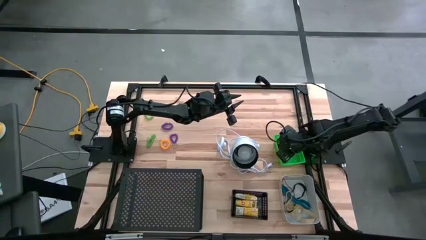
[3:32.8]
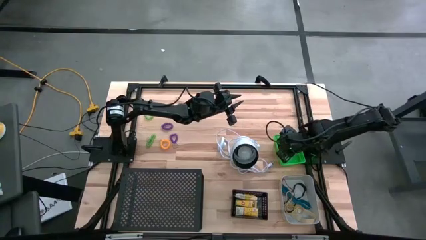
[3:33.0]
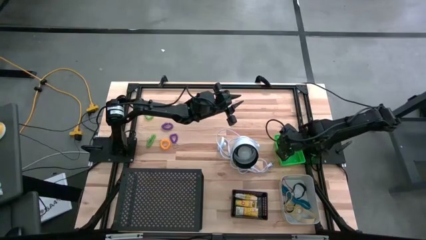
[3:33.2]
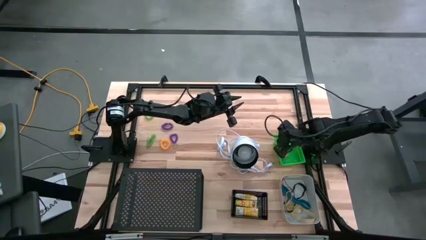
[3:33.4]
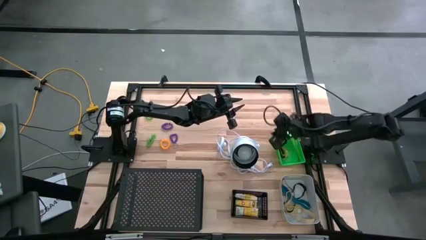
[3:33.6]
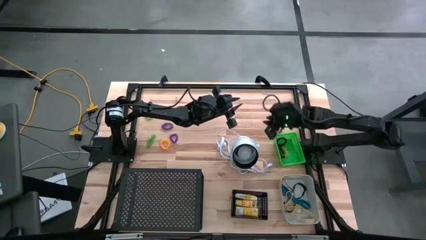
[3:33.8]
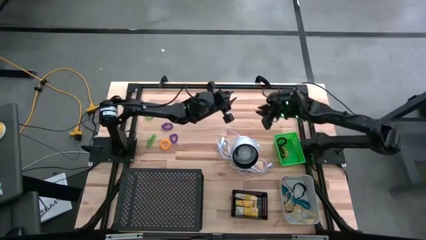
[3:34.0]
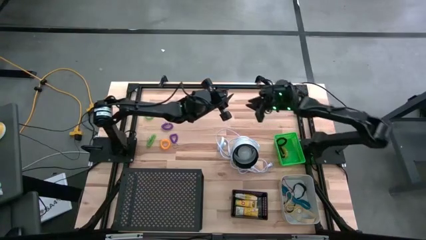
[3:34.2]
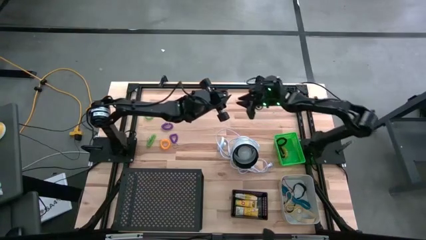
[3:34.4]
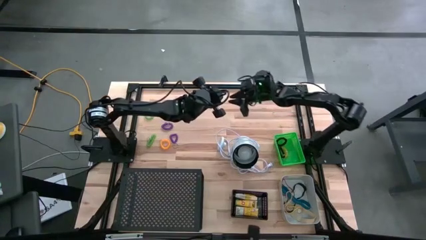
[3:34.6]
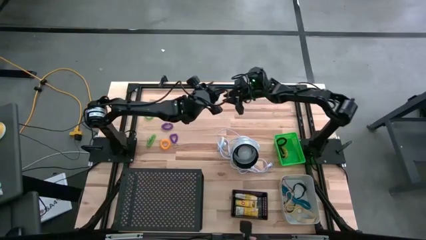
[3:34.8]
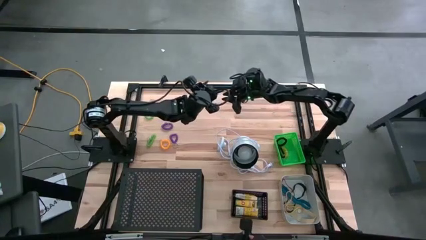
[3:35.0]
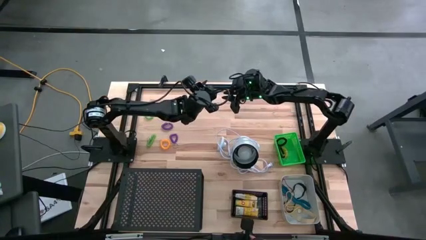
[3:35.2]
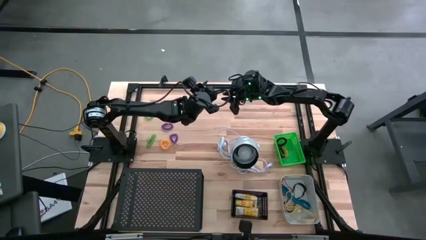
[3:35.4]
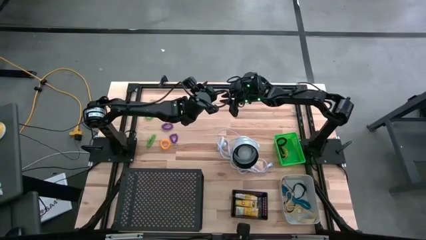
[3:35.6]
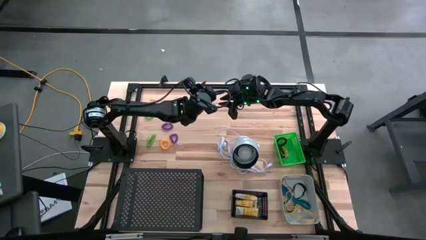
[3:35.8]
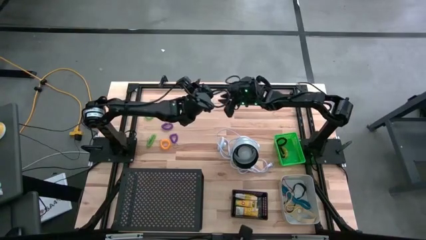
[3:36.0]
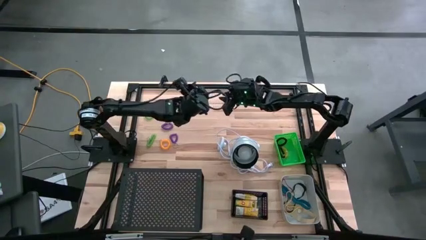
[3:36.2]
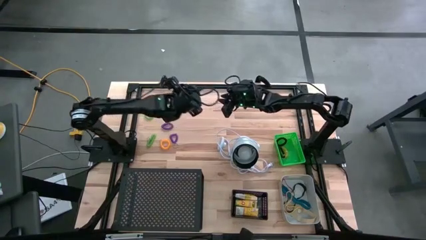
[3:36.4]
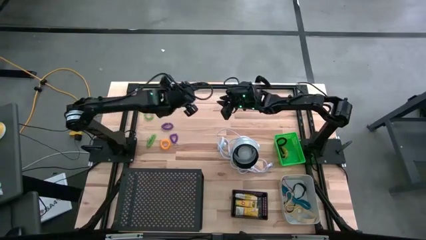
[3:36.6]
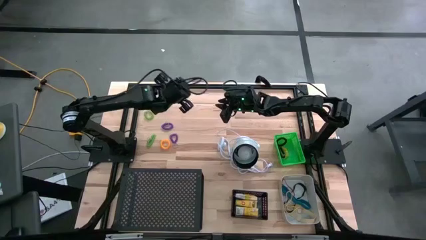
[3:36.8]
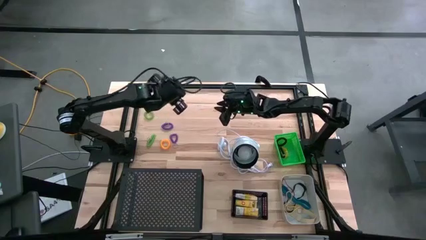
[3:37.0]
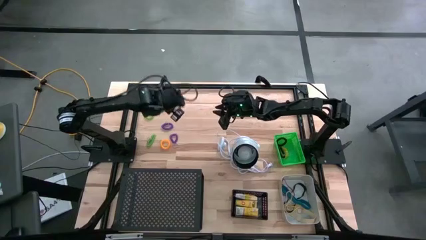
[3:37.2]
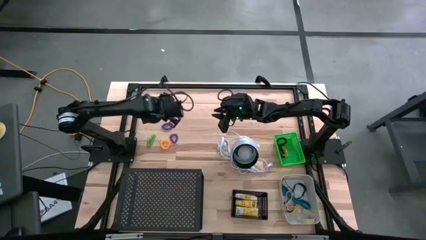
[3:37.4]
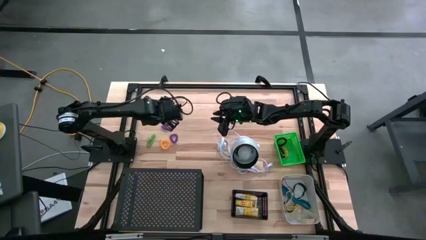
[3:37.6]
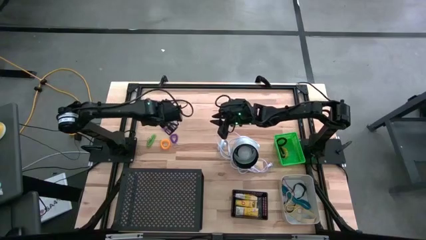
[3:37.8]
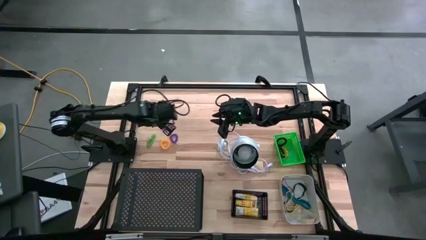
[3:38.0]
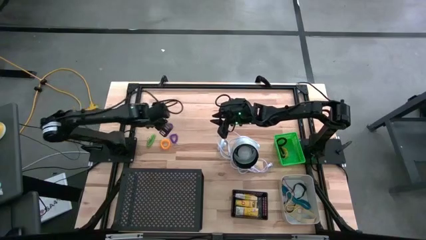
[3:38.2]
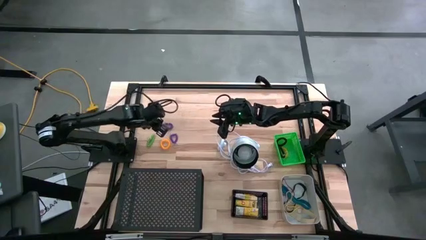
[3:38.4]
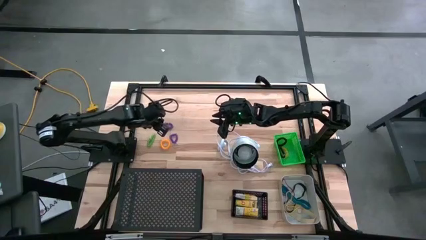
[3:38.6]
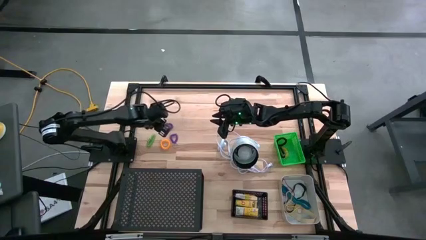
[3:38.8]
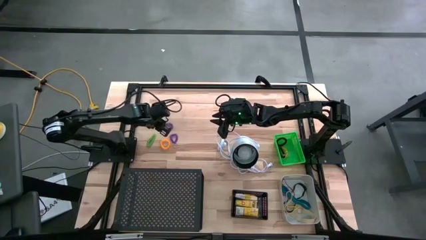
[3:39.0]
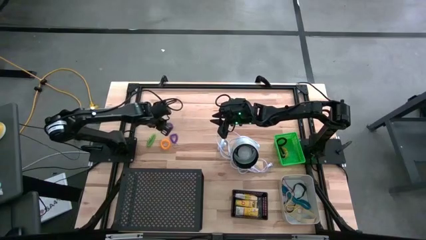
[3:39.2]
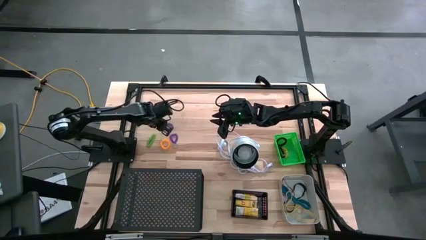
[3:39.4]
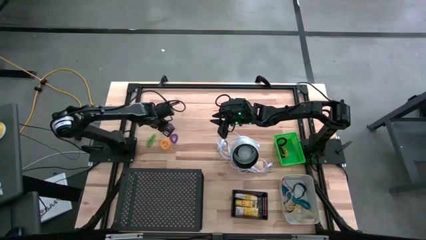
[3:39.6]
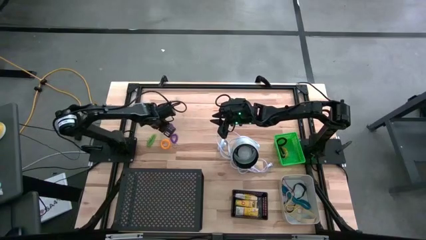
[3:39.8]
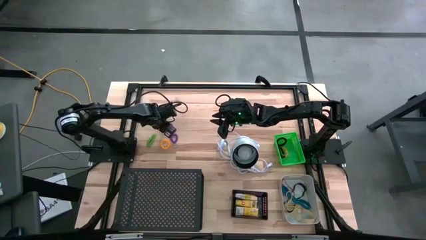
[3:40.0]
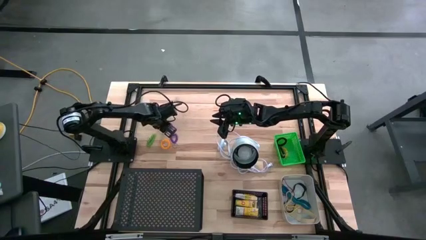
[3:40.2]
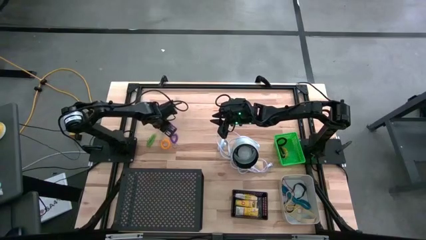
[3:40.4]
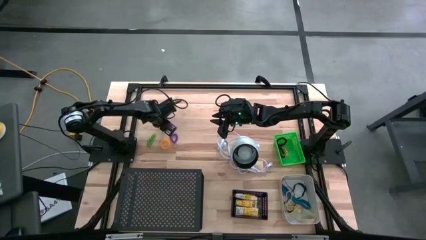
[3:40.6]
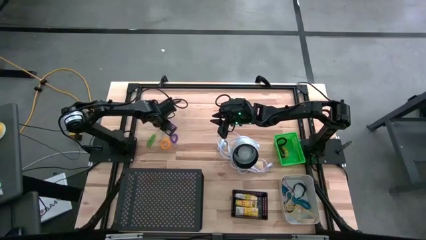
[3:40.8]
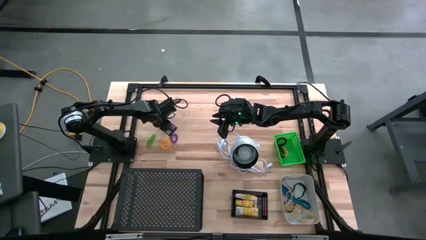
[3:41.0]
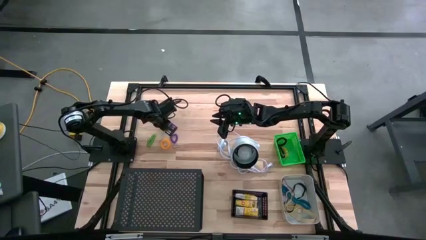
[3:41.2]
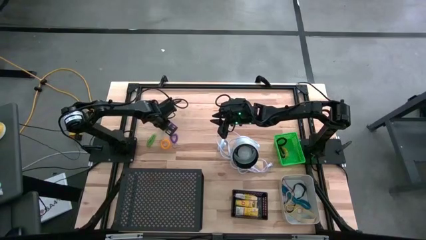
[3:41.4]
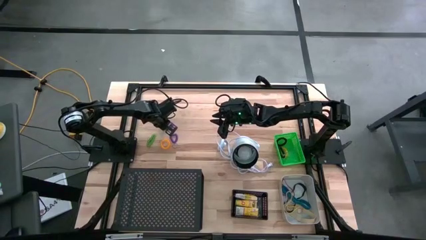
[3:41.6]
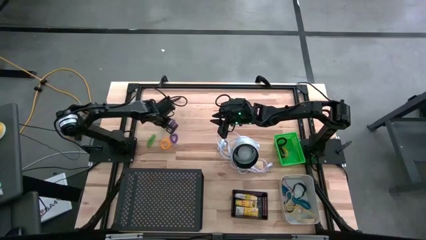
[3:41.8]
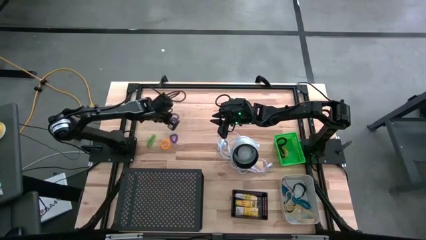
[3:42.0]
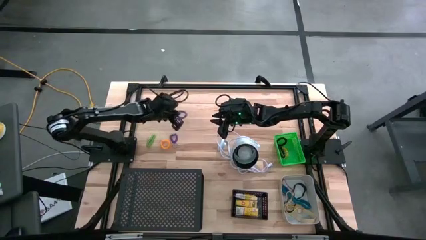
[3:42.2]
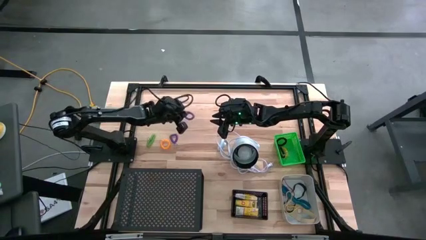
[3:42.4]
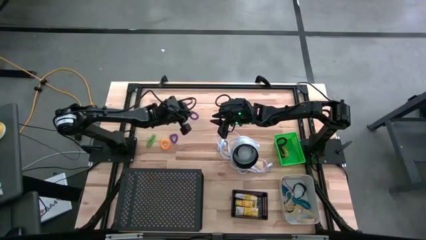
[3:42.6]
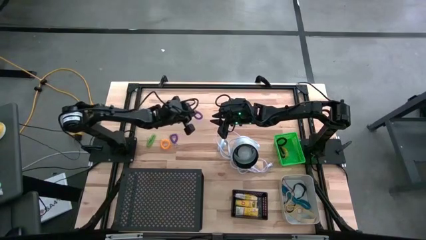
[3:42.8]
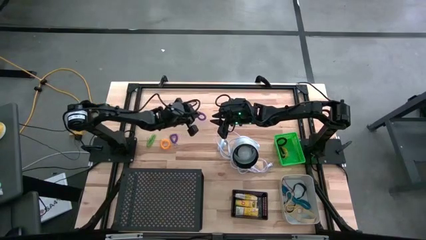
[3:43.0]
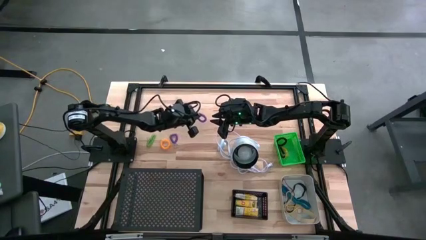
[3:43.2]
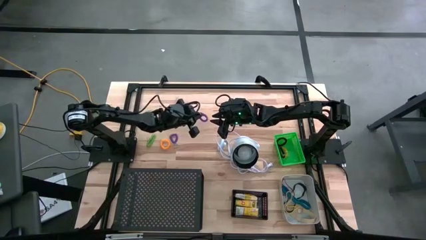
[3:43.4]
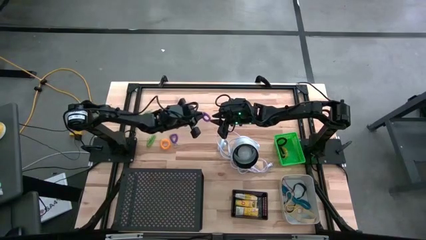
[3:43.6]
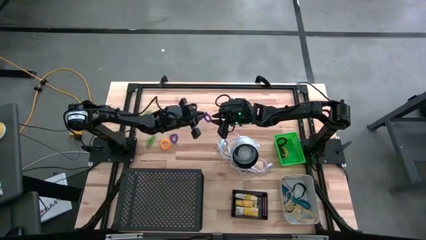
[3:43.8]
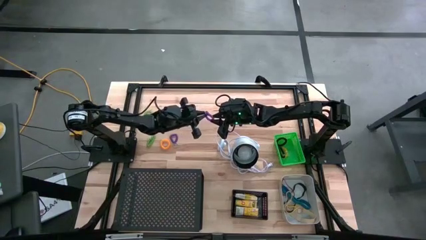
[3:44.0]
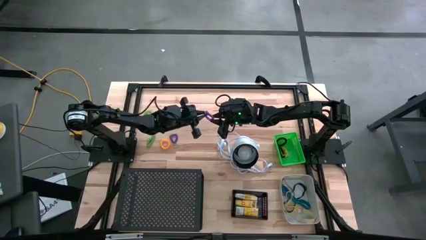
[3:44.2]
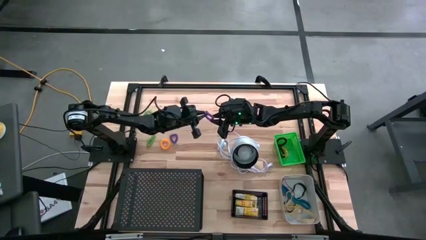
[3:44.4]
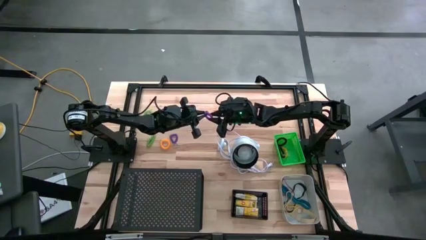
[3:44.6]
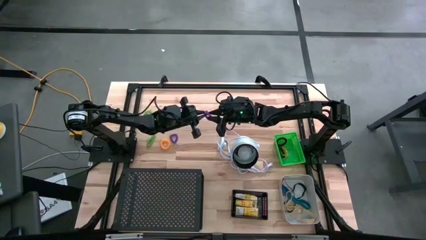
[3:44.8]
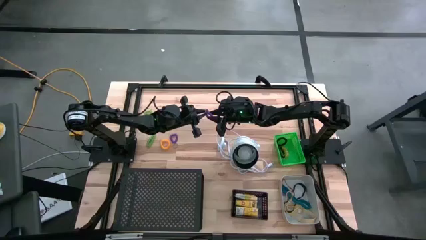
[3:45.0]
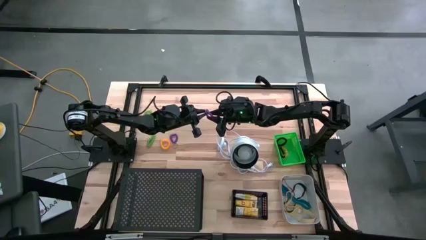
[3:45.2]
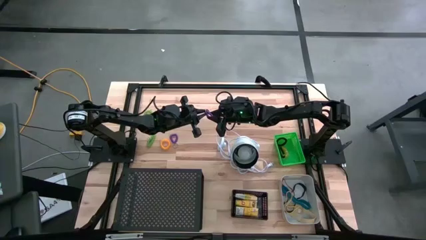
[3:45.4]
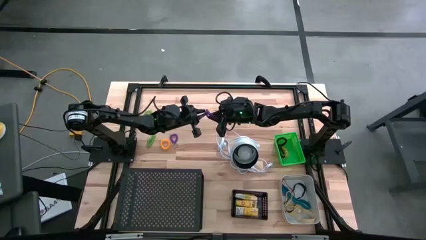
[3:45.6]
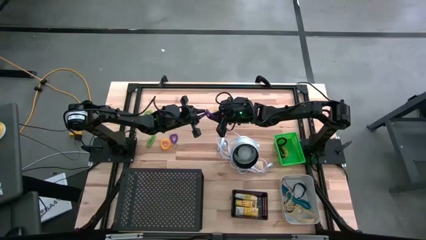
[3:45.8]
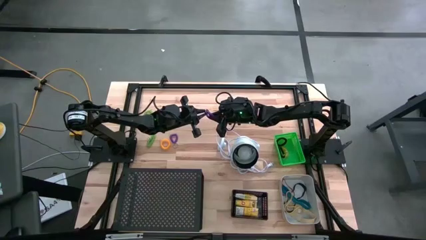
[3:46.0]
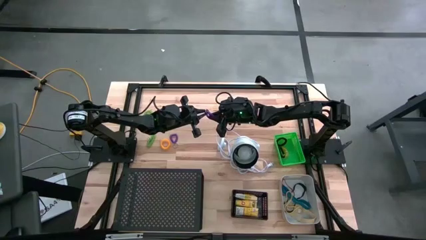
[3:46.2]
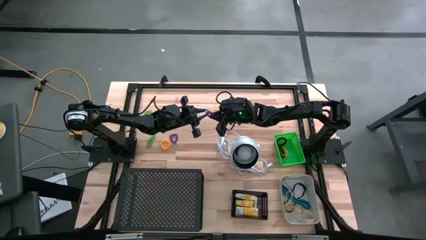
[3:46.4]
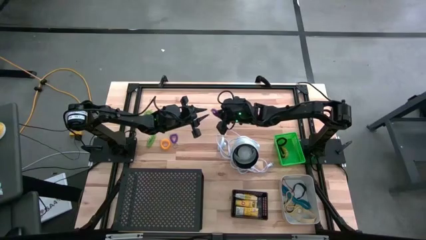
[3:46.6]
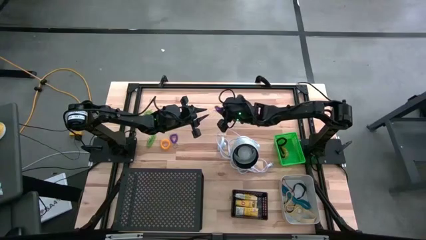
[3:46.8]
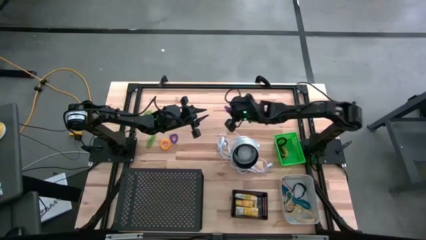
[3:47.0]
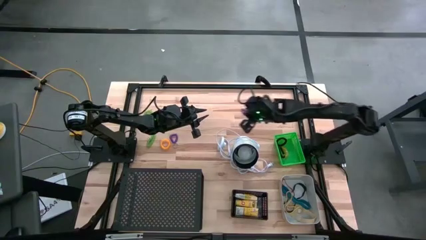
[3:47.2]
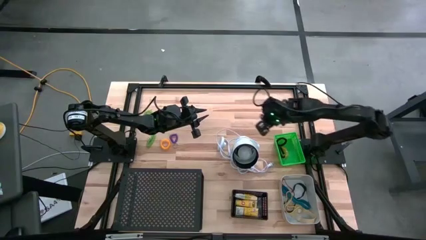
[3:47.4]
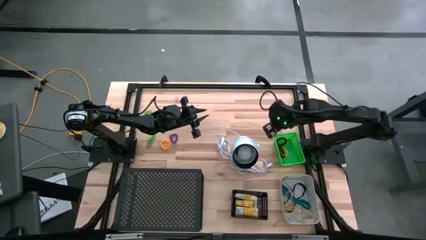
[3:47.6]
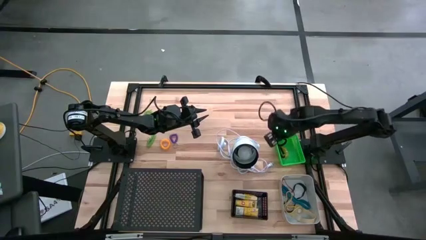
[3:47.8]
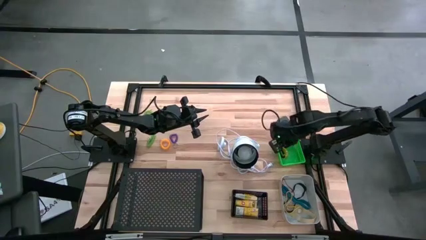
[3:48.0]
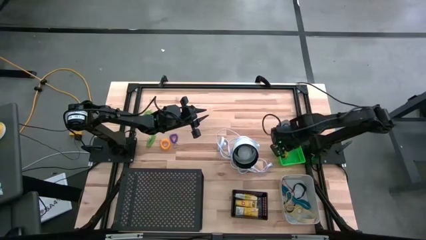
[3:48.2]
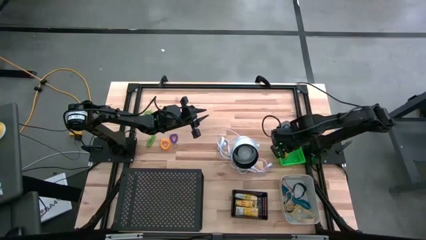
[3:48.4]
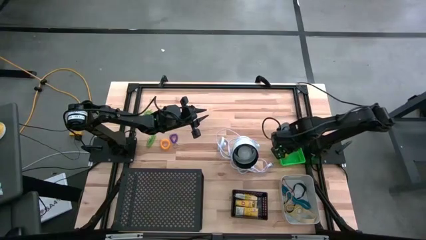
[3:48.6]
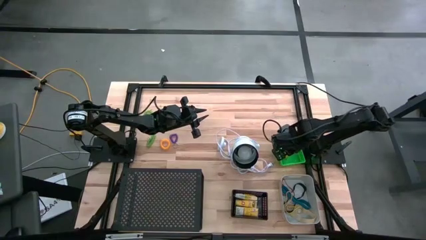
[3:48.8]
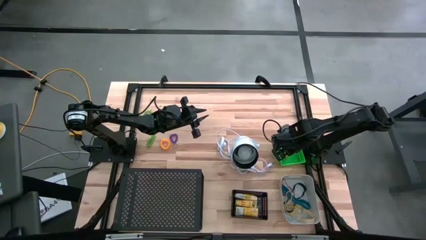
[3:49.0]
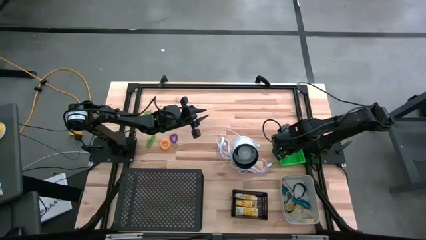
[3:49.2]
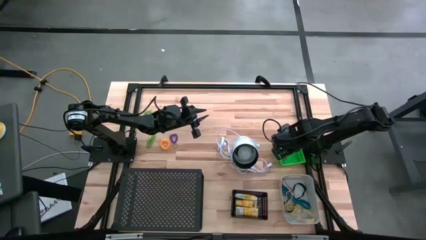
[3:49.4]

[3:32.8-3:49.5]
Task: Pick & Place Office Desk Supplies
Put the top purple spring keychain into the green bin
